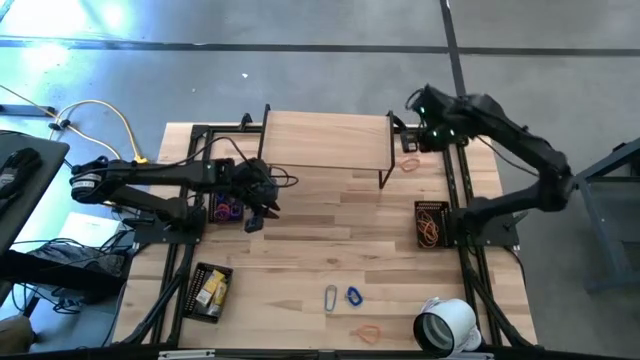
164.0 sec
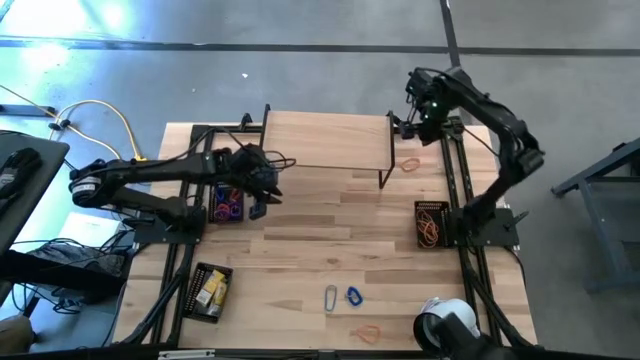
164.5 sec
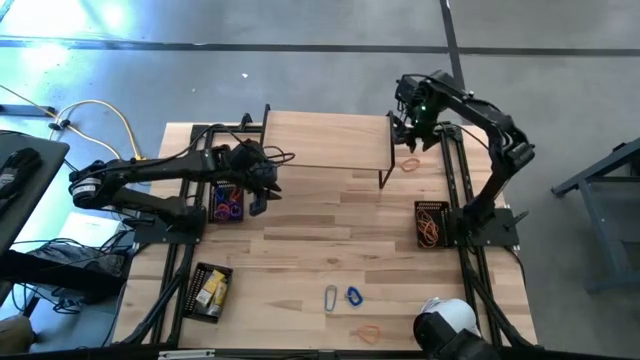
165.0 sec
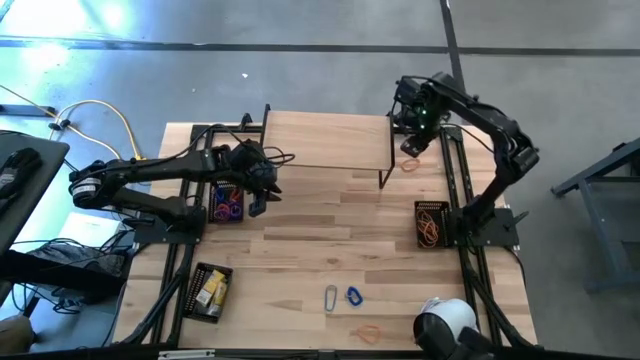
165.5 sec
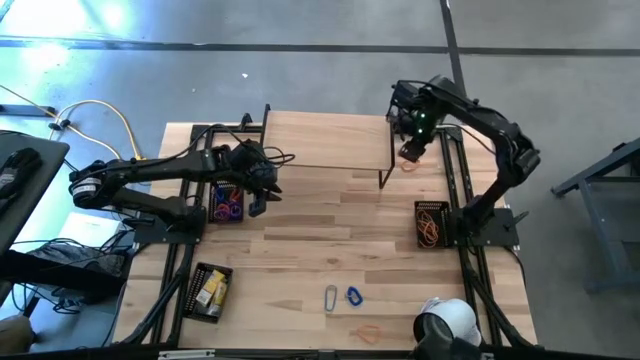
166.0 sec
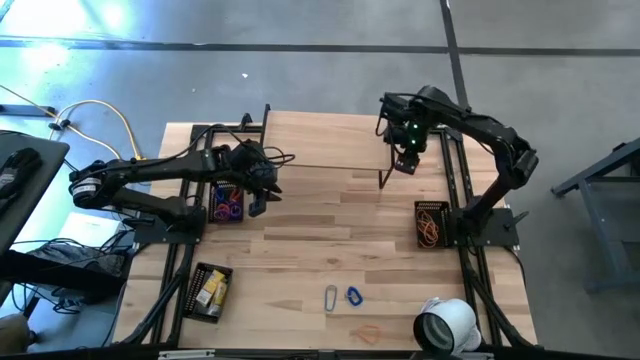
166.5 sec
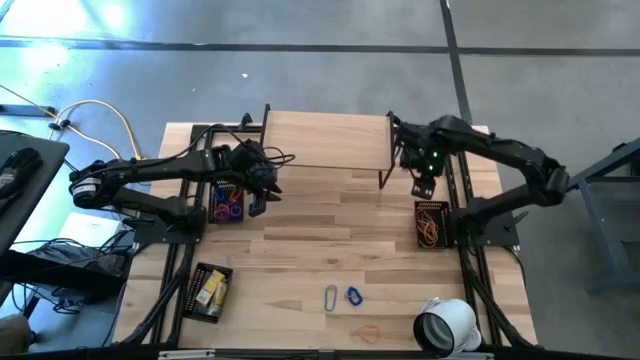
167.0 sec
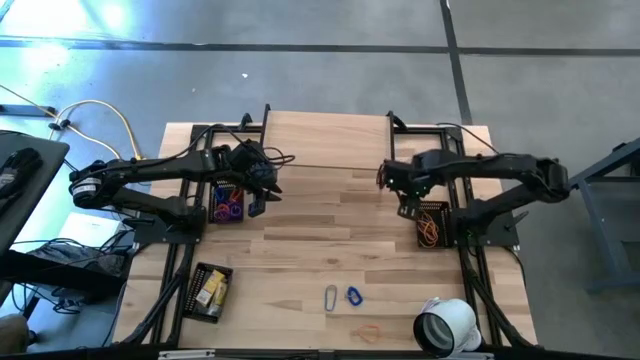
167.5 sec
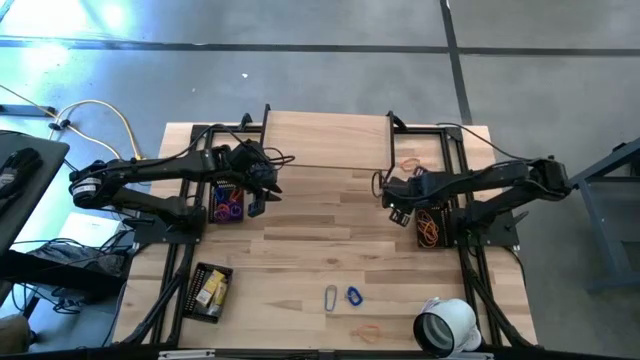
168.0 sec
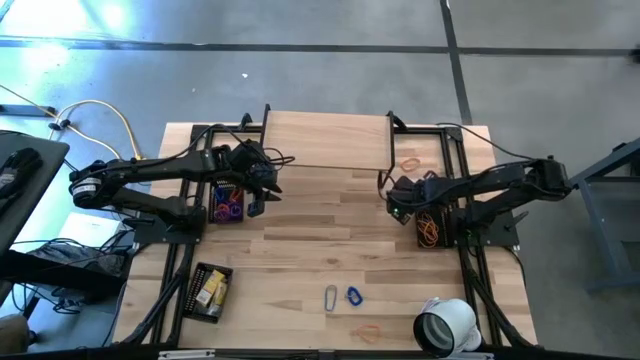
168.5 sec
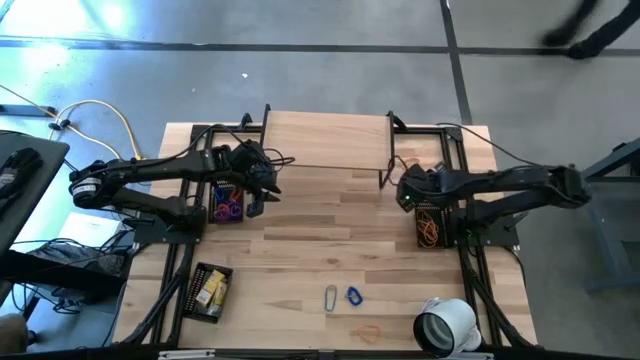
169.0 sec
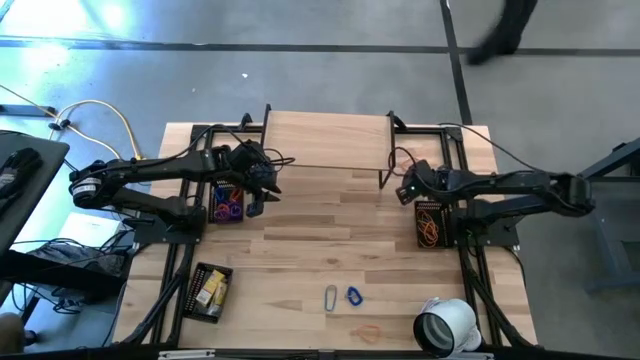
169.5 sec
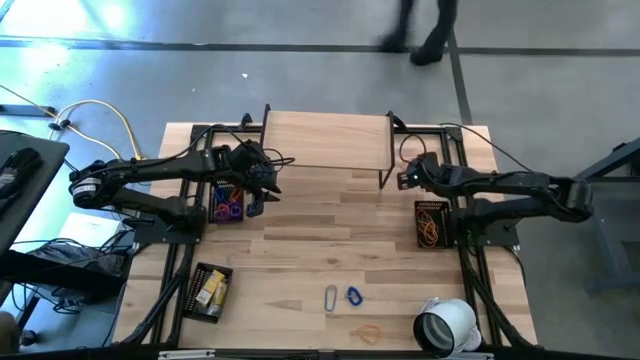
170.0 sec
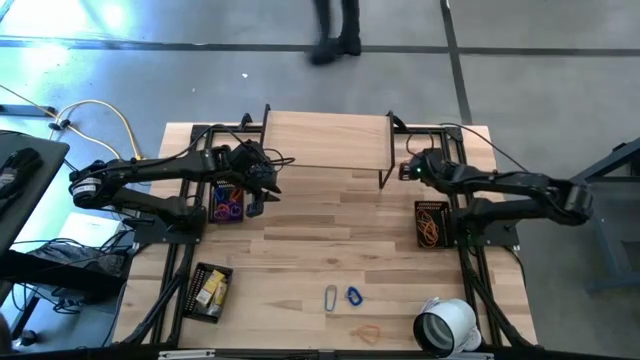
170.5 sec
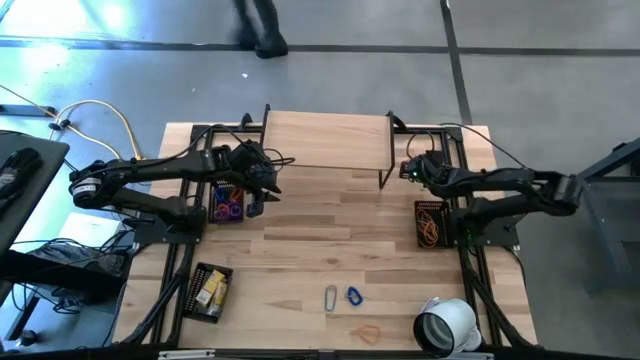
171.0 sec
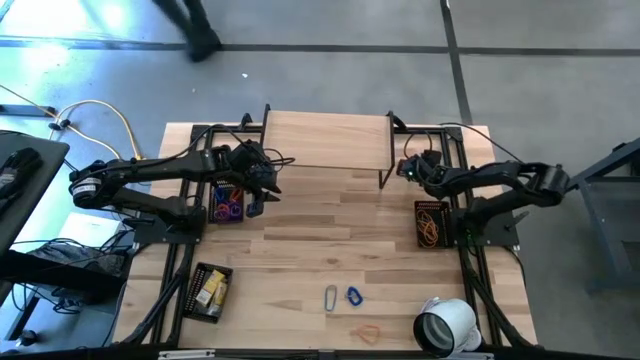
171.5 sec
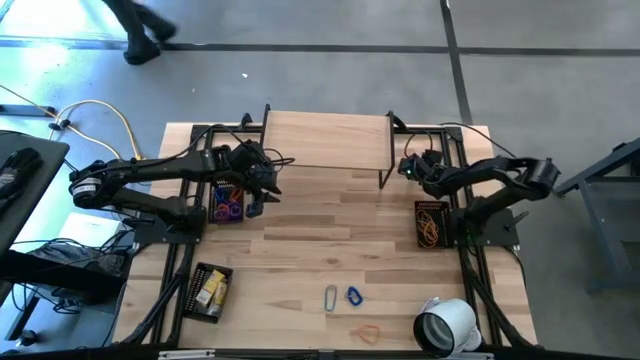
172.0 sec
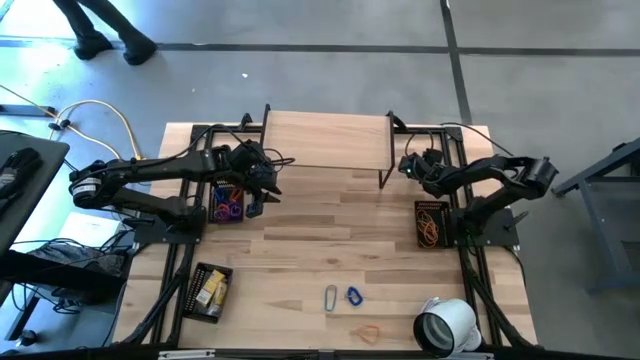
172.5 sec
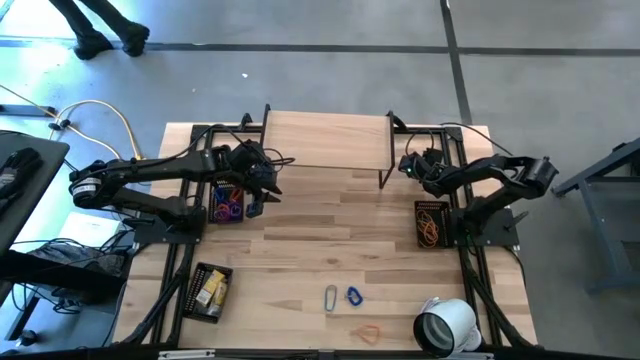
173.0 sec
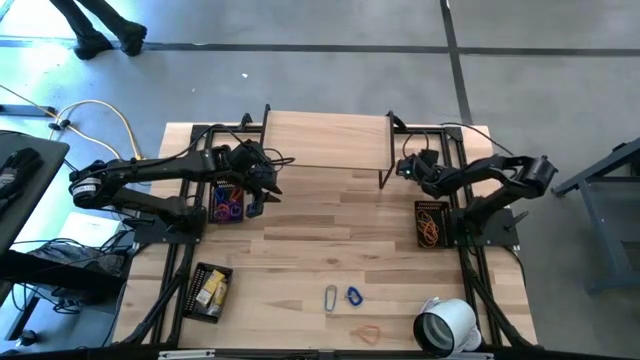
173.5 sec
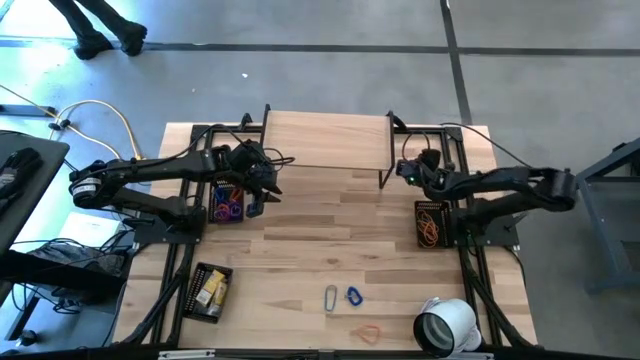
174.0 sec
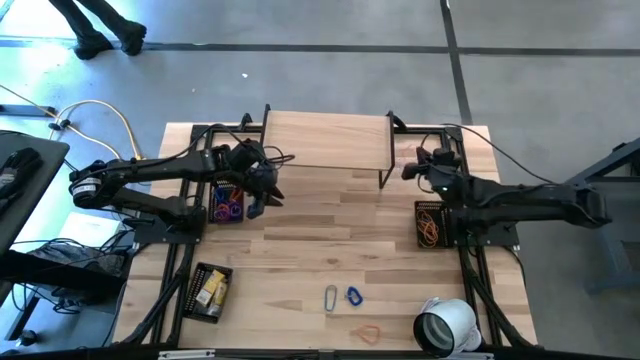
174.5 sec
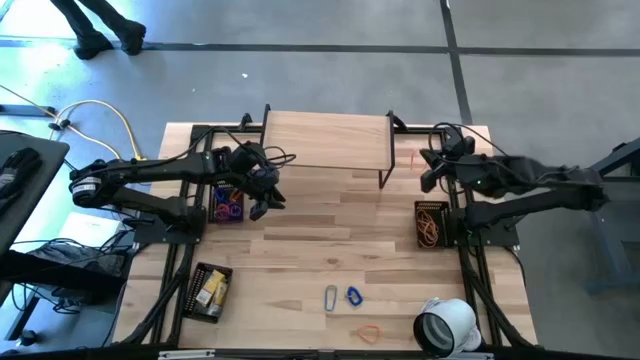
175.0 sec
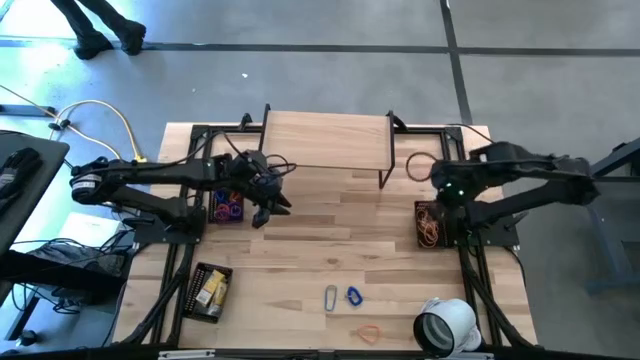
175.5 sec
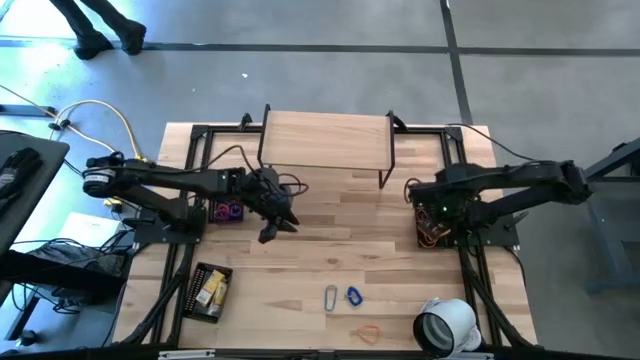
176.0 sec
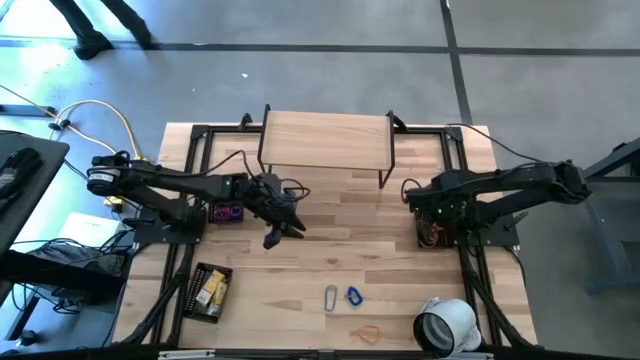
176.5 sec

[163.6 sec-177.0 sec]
Task: Pick & Place Office Desk Supplies
Put the orange rubber band into the top right black bin

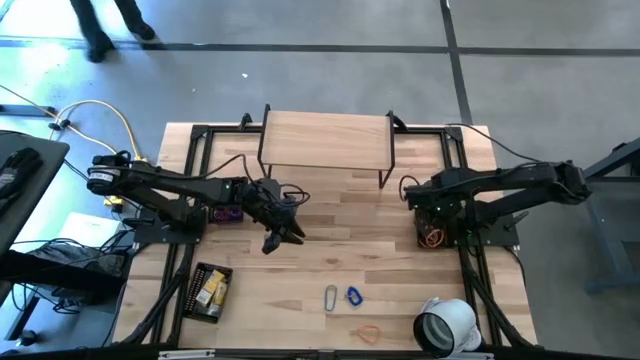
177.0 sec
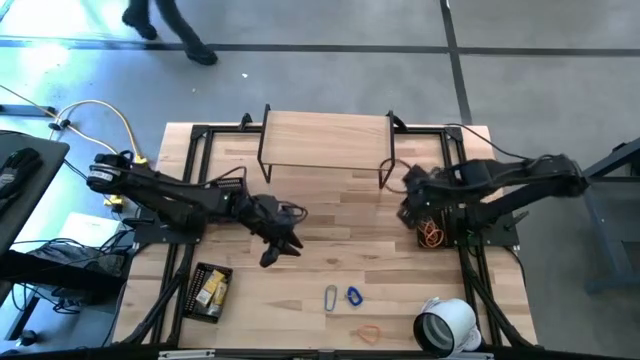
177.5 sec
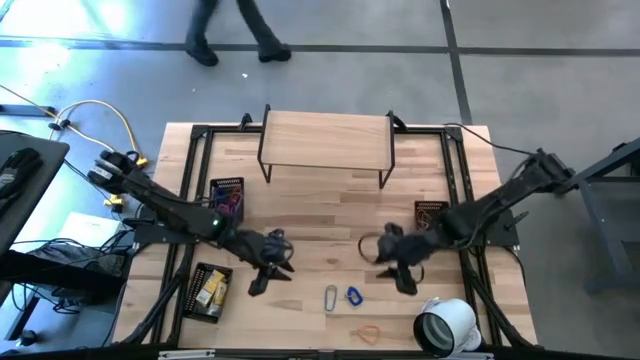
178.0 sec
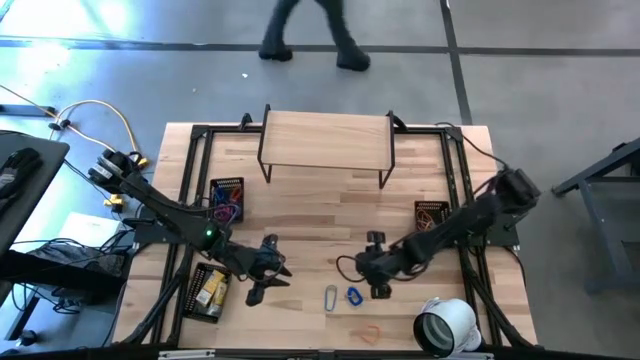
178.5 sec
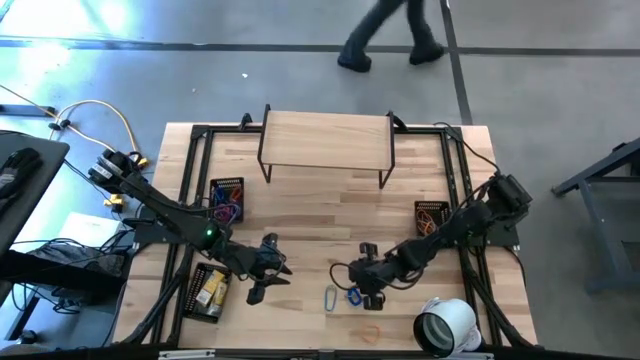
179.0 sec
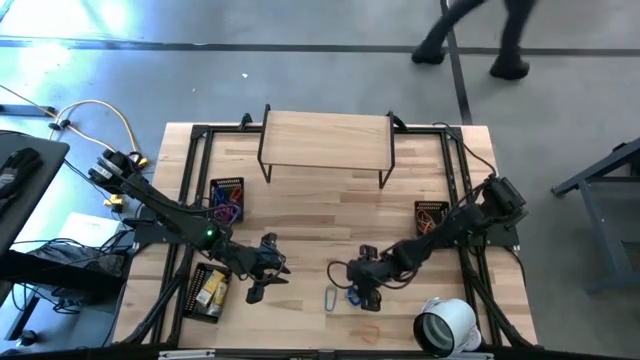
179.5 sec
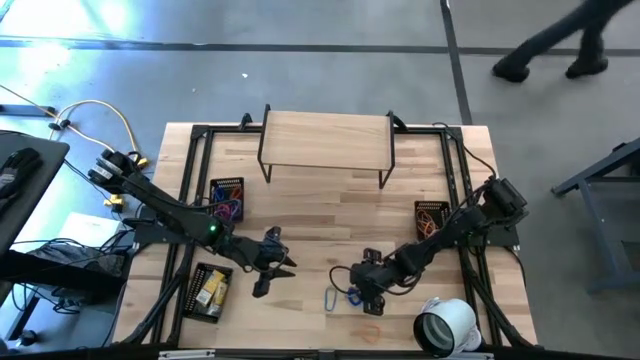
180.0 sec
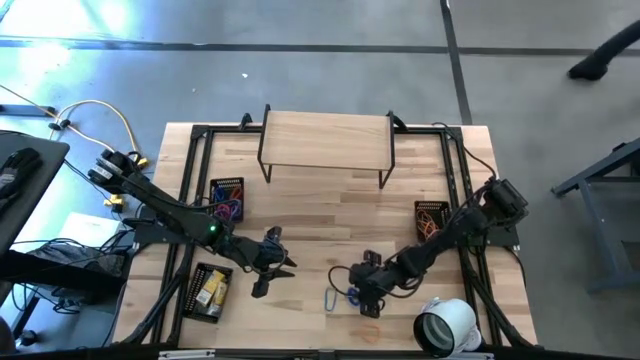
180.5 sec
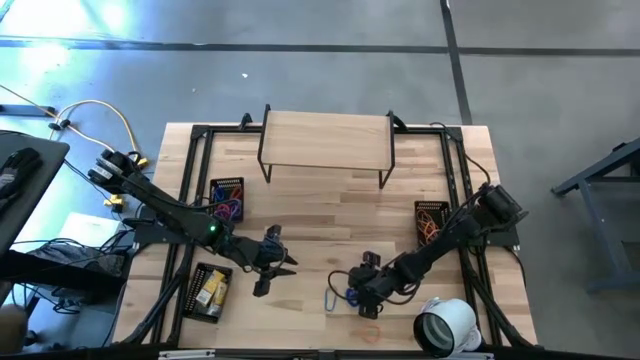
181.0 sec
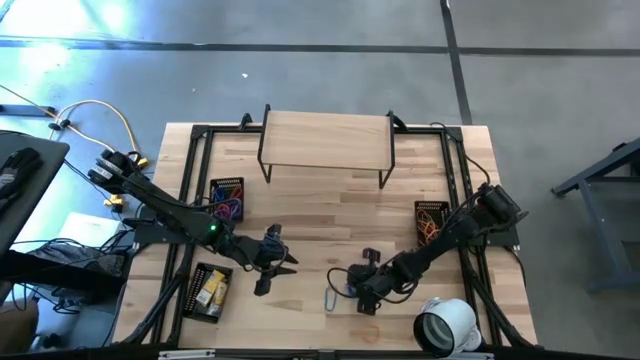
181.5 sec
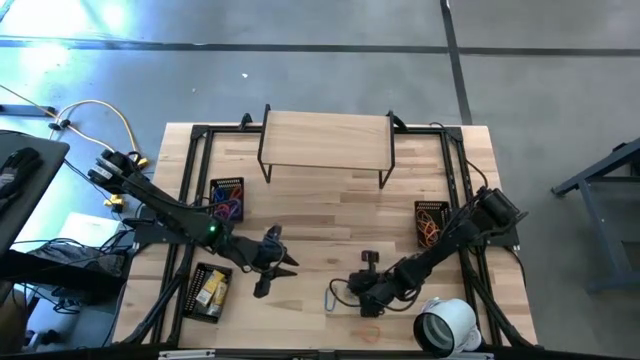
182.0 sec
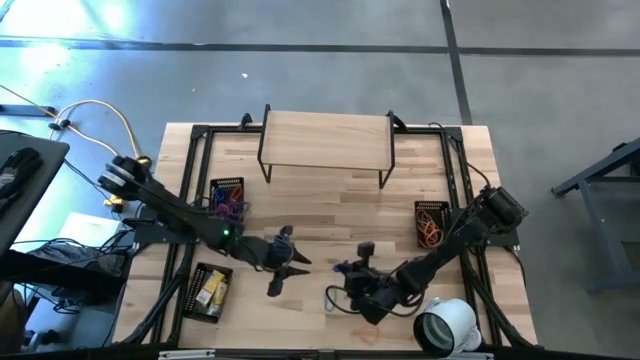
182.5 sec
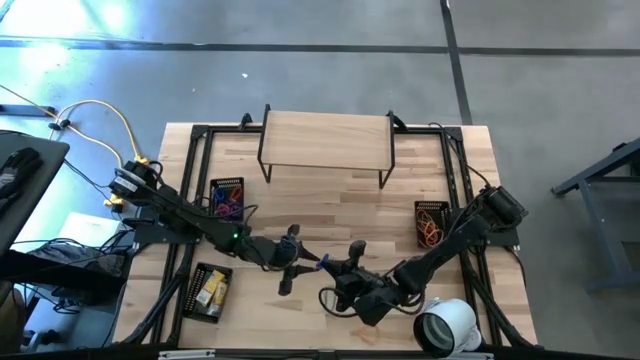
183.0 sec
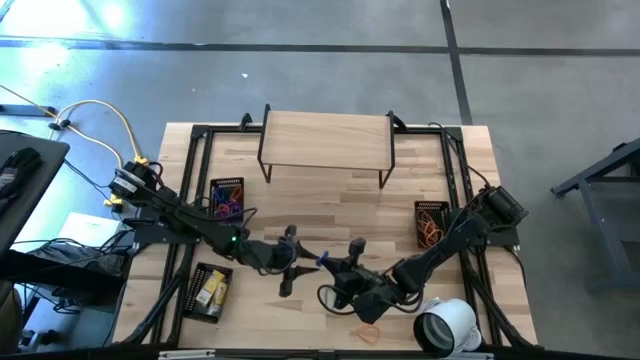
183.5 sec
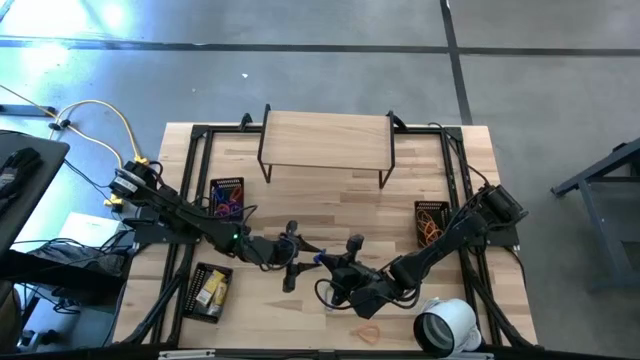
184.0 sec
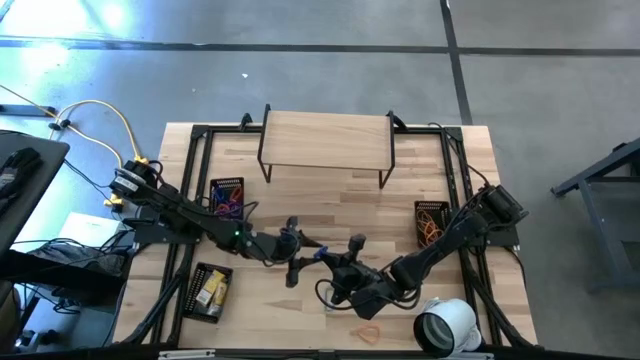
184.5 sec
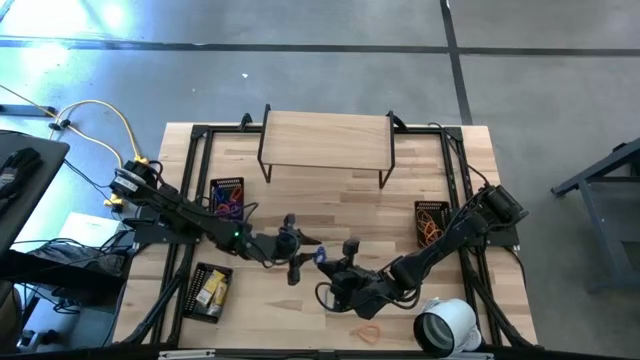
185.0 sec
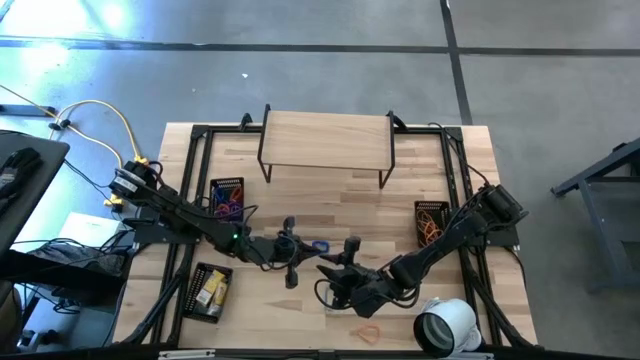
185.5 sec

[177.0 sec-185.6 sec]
Put the blue spring keychain into the top left black bin

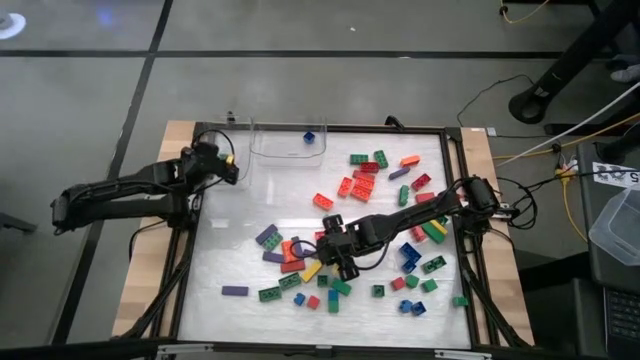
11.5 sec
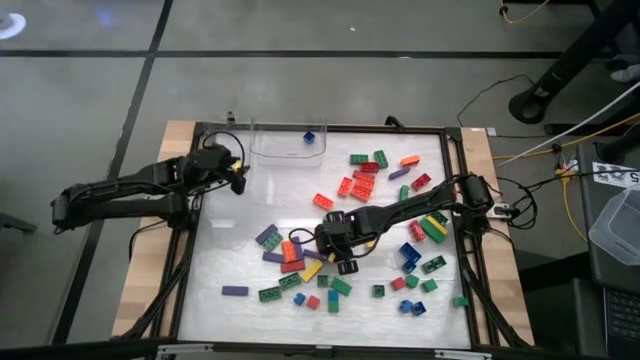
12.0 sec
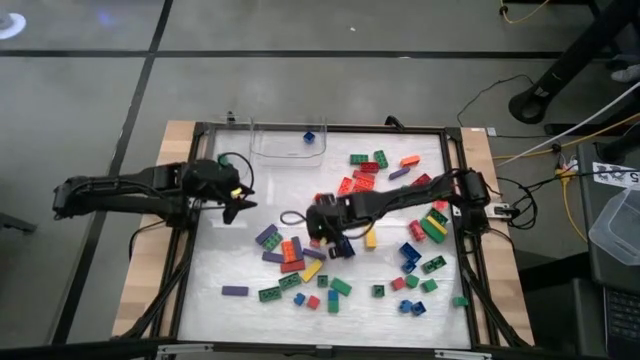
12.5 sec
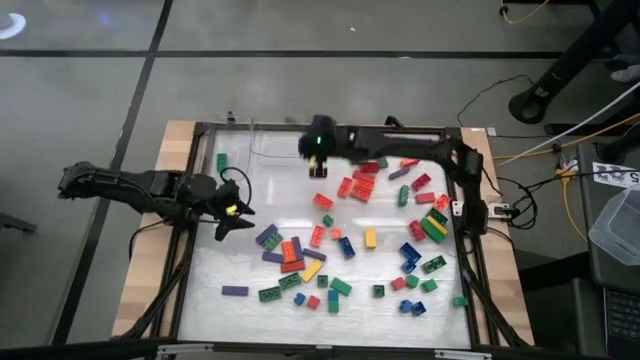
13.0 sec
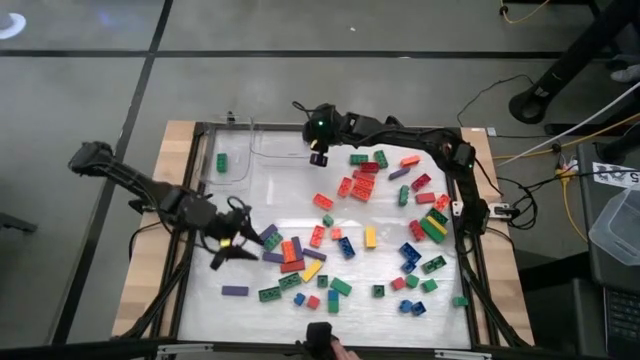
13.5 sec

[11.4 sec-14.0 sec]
Task: Sort blocks by size
Put the small blue game piece into the right transparent bin
